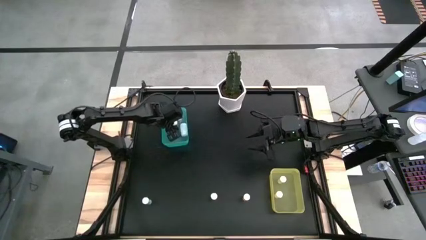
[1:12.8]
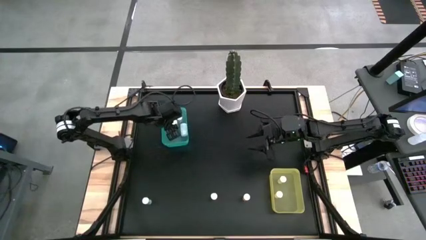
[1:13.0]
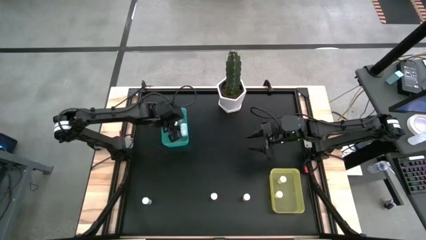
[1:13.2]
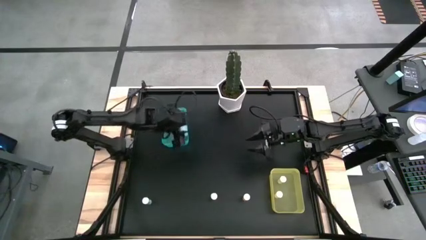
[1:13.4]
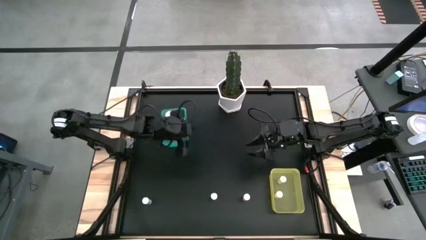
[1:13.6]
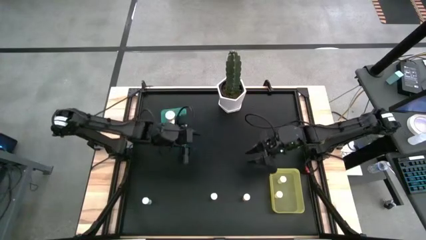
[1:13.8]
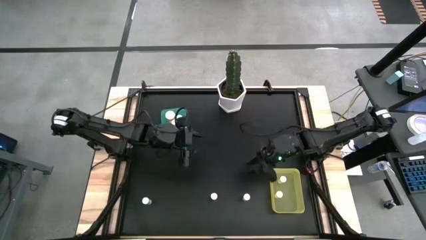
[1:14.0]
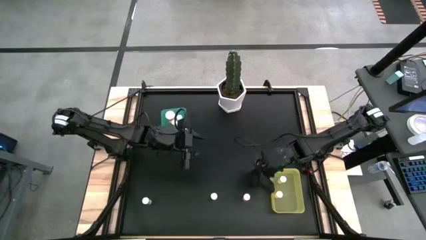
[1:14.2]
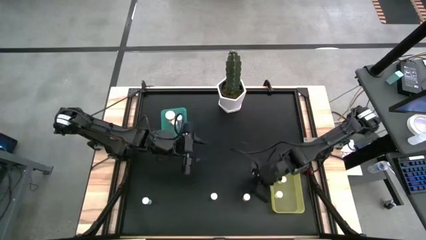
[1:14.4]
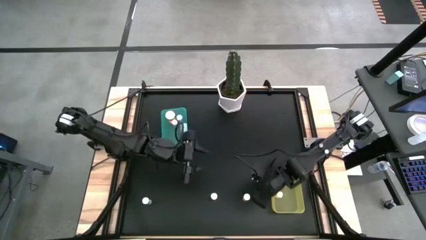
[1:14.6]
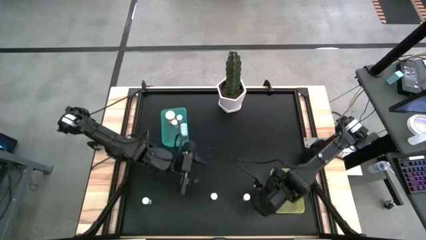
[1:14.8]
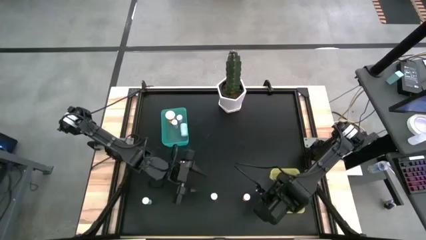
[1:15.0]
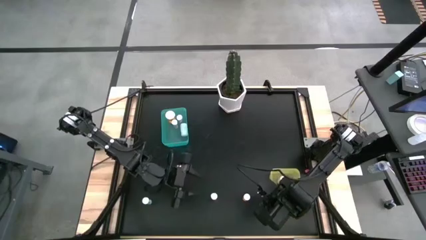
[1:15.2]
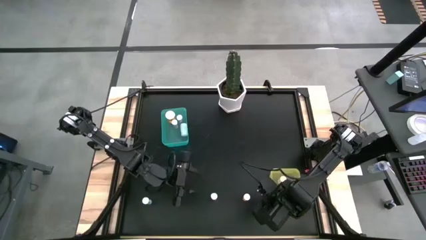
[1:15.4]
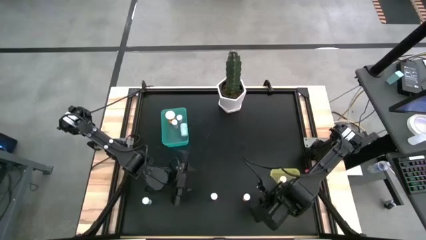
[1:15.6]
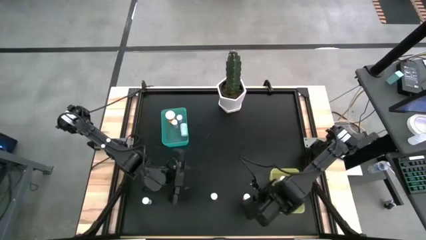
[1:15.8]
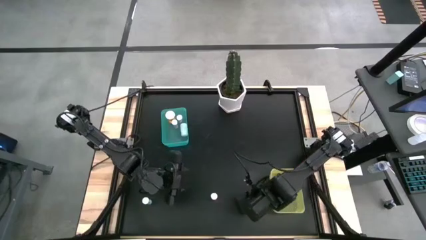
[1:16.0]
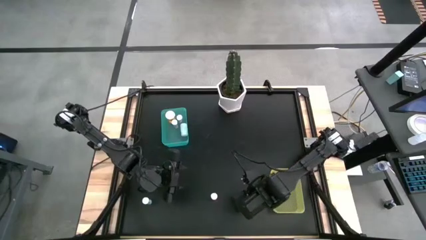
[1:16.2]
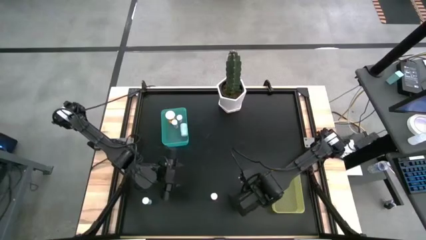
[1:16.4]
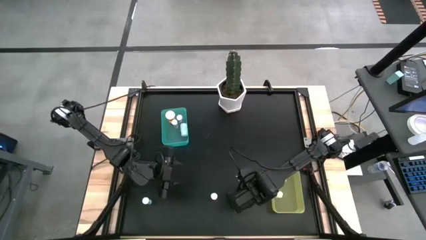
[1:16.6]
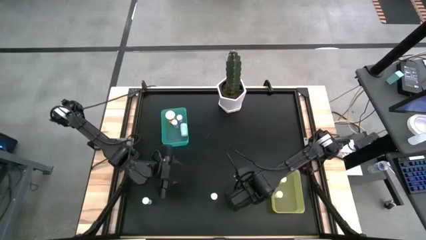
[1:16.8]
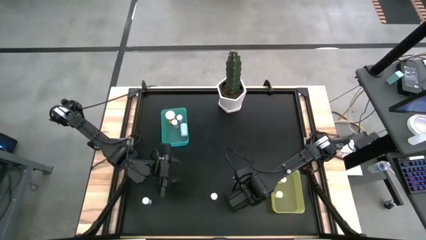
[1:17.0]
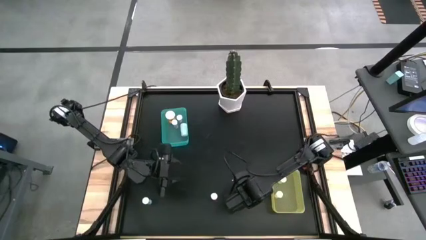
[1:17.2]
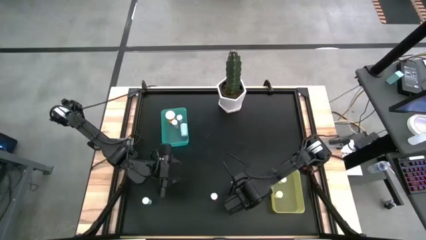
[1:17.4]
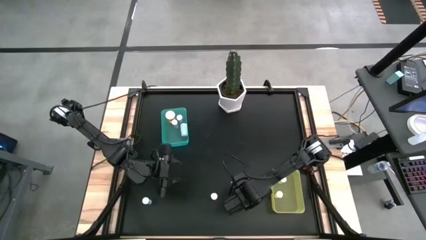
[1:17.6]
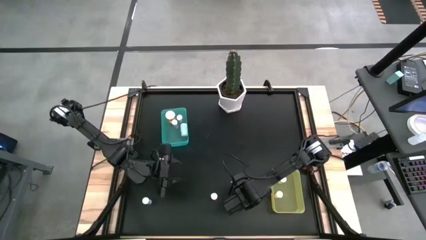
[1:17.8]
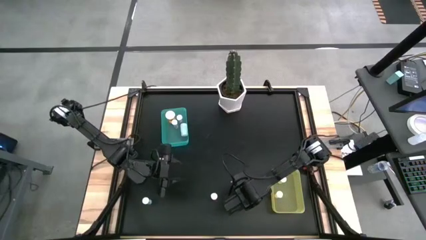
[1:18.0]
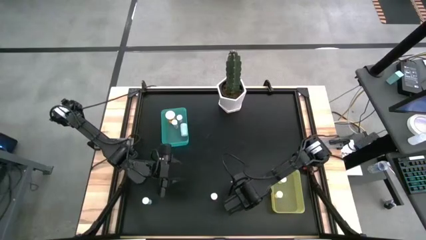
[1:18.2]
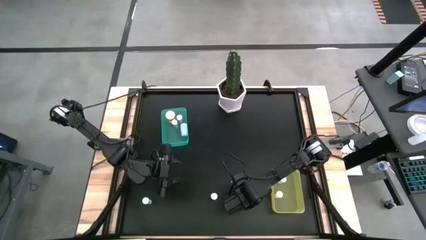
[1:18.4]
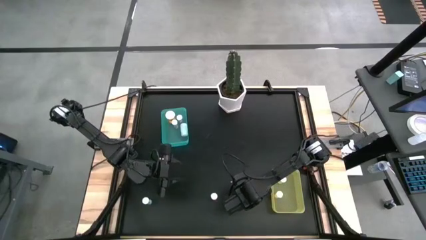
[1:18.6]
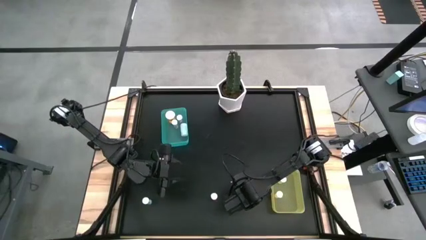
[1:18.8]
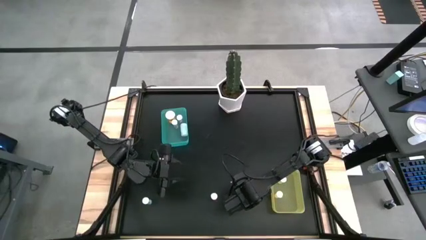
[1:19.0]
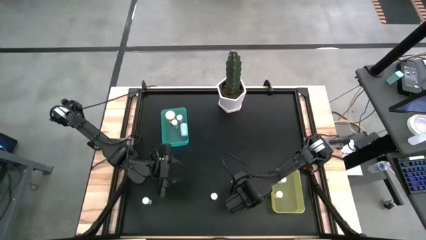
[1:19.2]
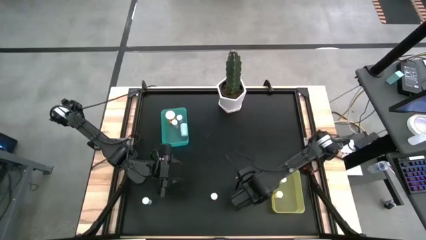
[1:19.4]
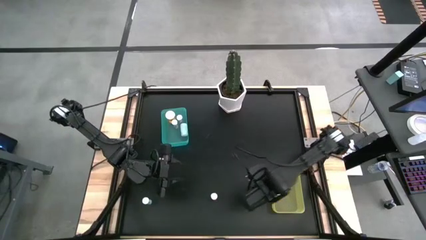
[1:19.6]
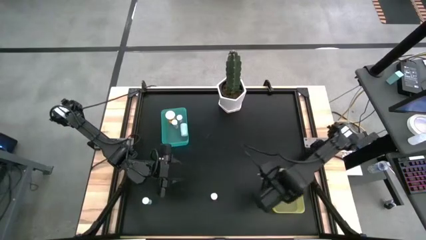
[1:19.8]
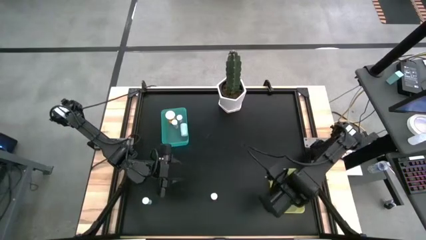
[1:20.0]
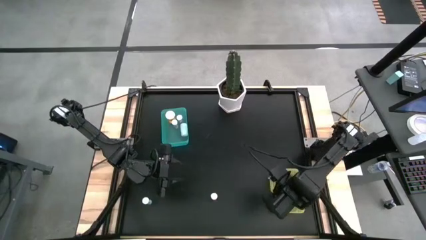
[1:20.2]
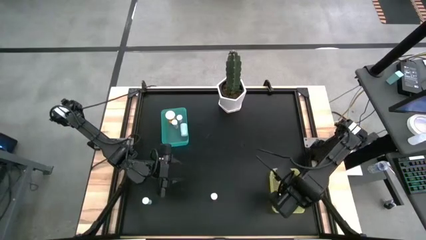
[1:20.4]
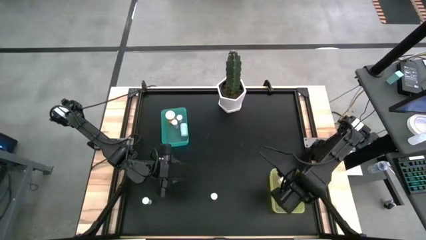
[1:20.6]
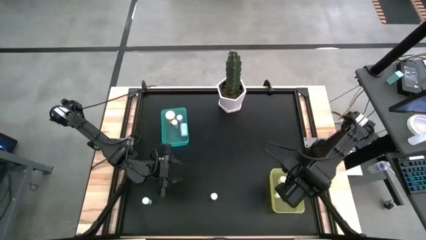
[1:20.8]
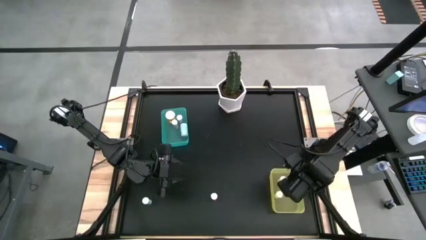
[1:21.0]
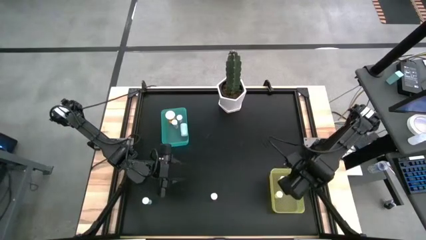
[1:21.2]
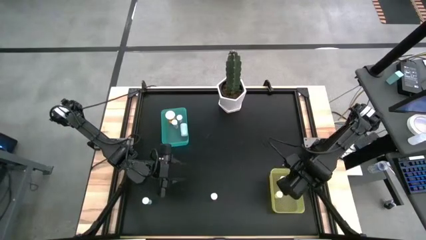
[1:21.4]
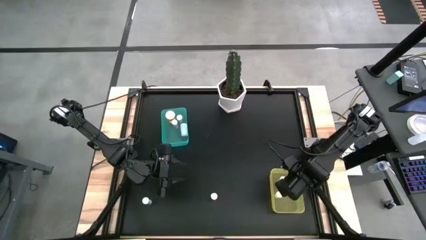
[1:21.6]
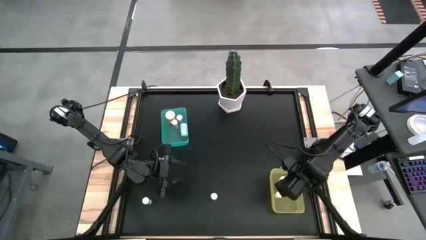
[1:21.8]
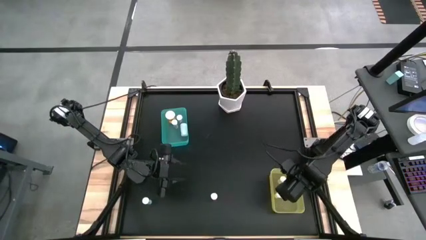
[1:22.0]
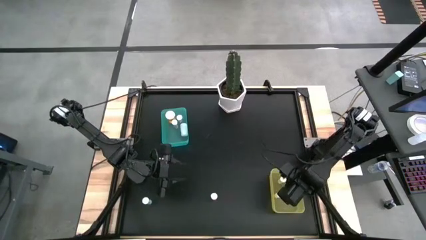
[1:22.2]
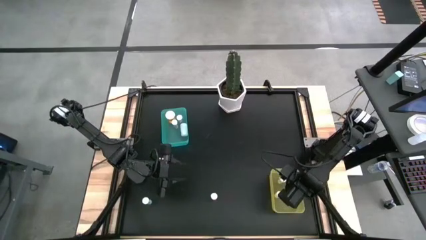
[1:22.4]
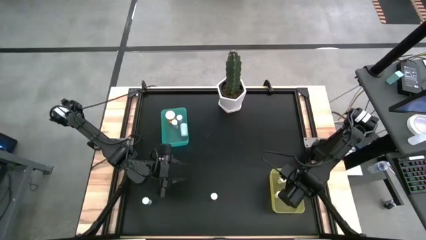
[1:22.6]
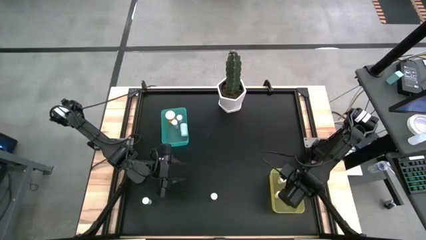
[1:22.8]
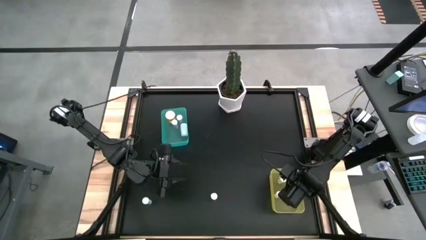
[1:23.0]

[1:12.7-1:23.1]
Task: Pick and place medicine bottles into bin by pill shape (circle, oval)
Put the orange tablet bottle into the yellow bin
